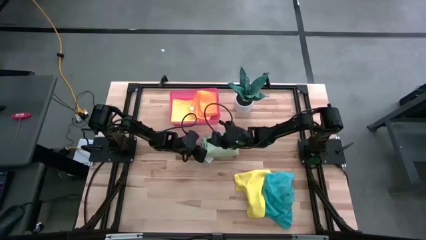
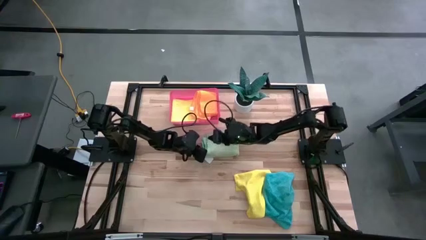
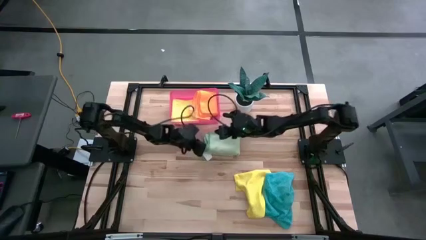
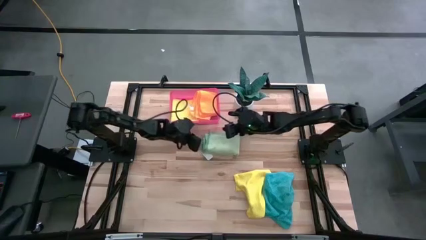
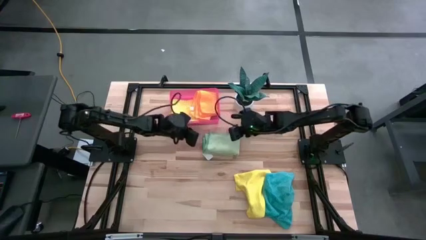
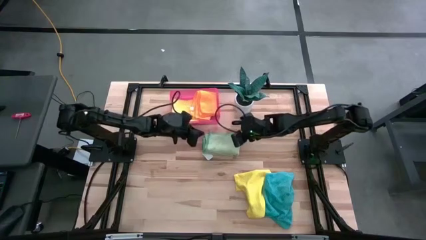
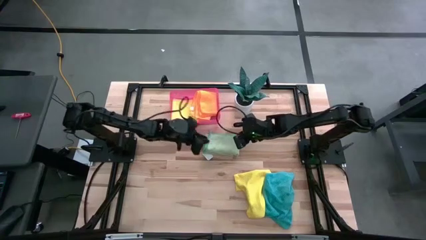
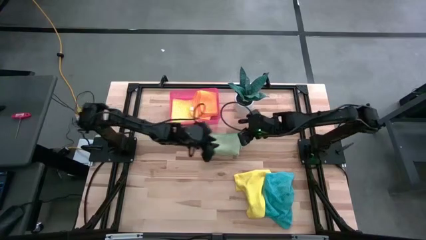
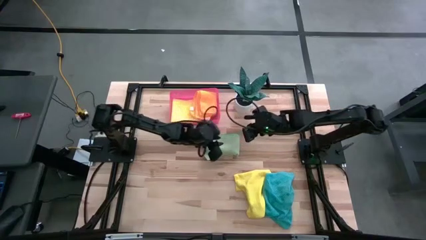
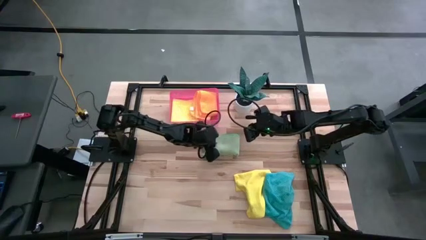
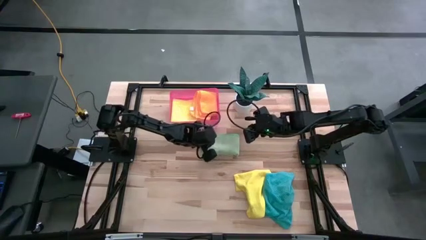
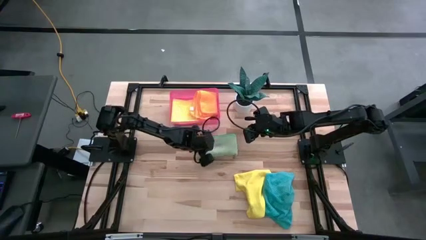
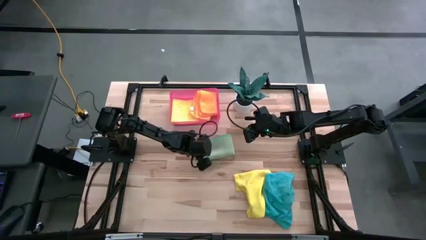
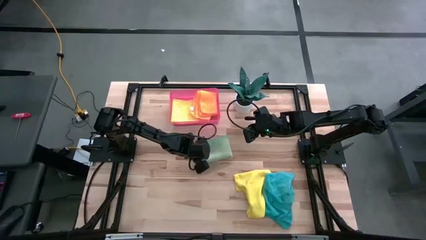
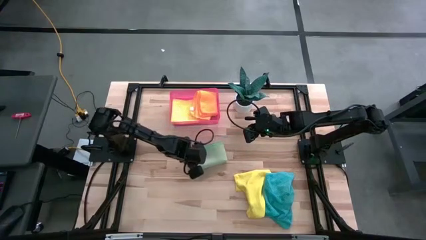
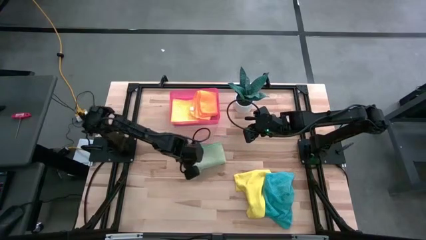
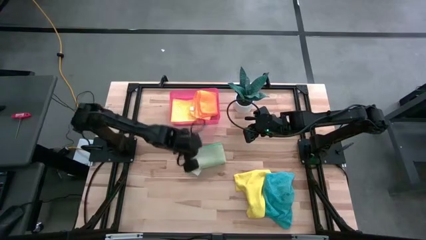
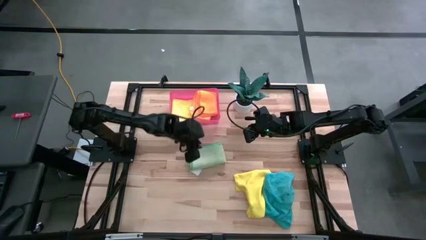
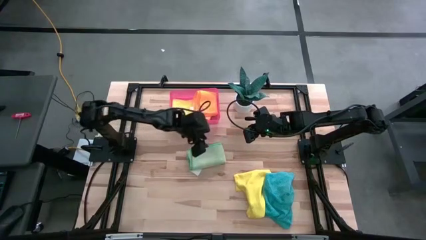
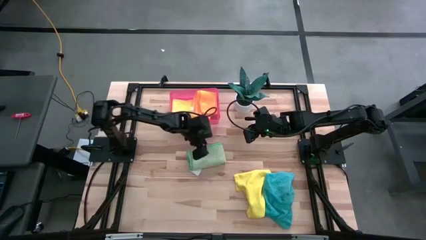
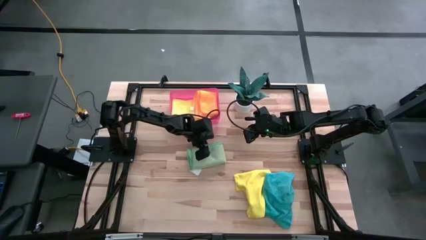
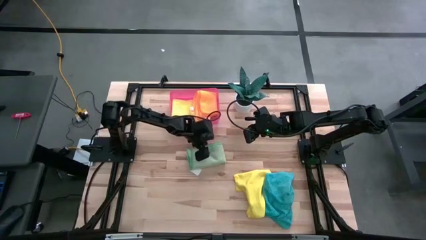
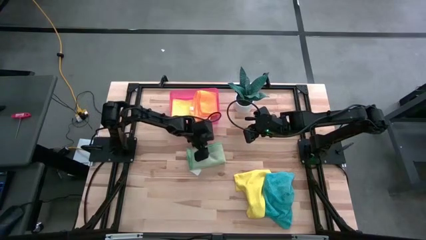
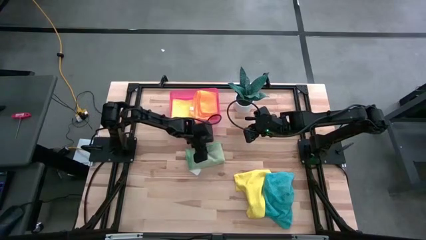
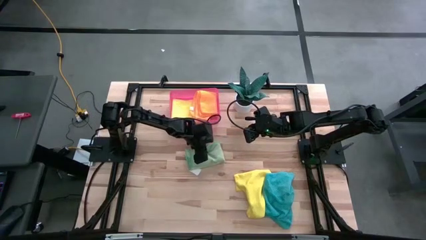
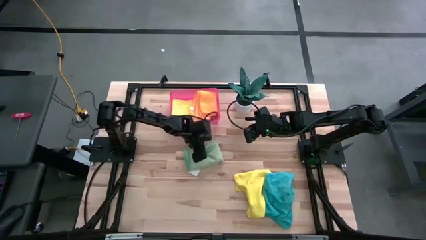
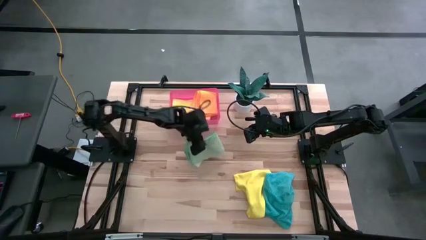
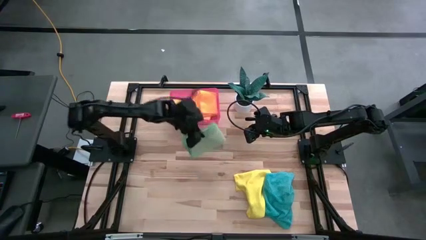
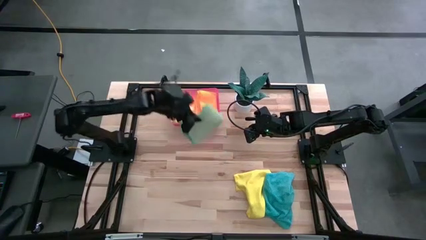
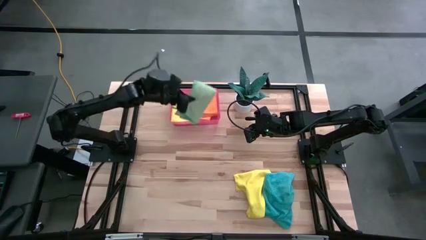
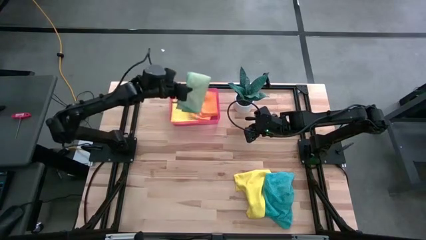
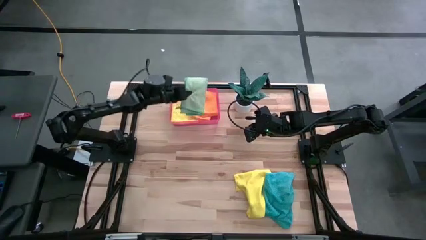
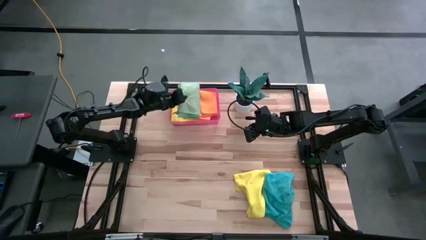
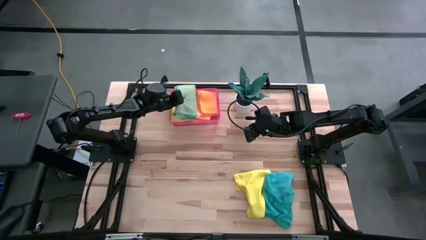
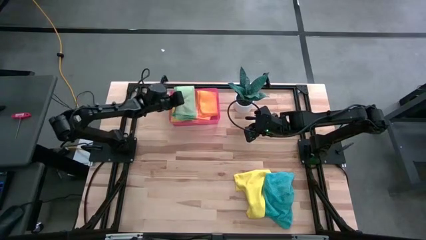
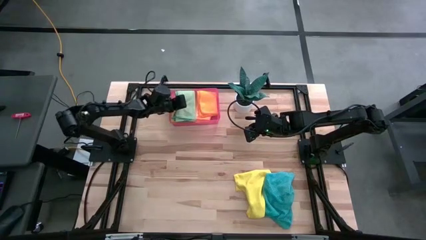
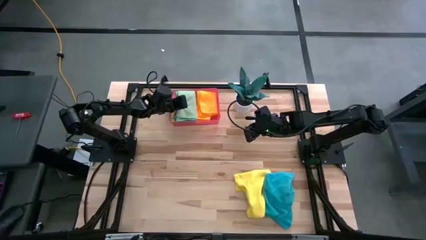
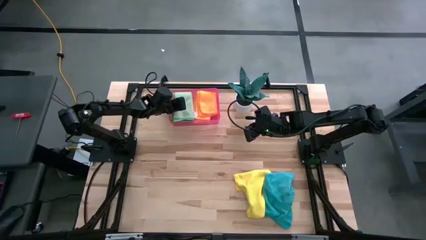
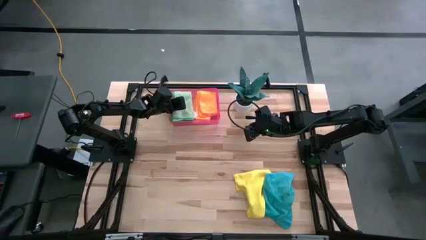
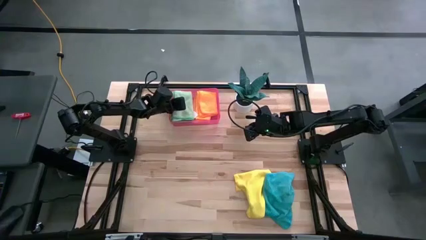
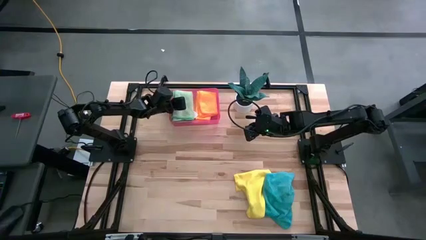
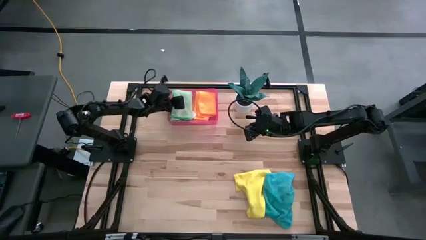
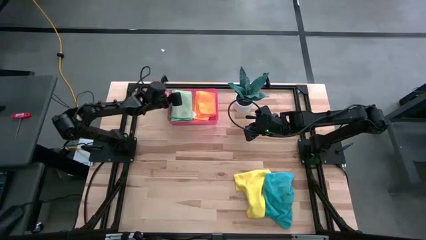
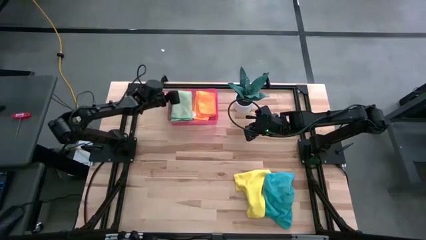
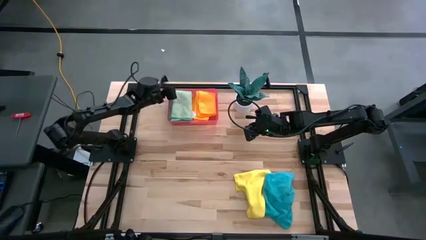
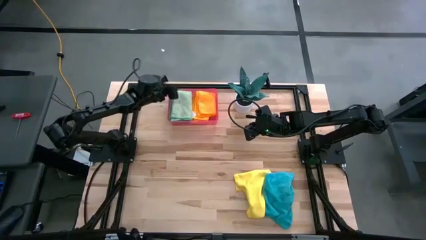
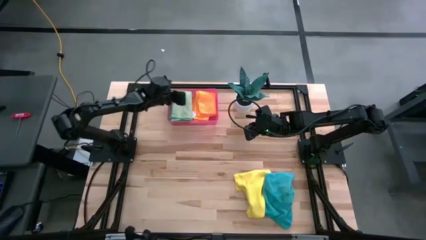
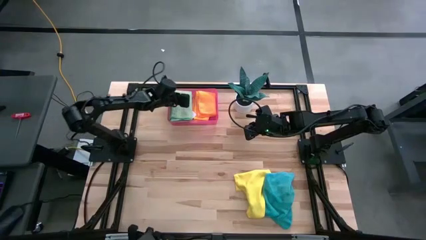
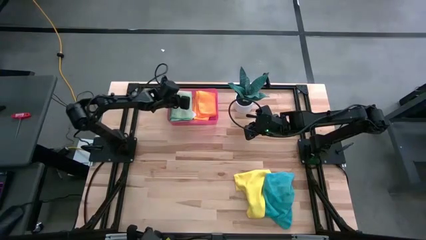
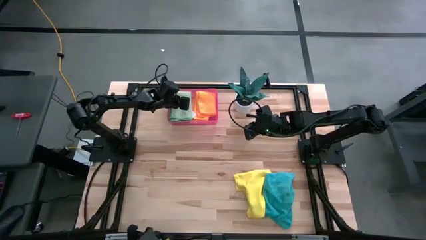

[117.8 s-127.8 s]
Task: Fold microfiber towels
Put the green microfiber towel into the bin

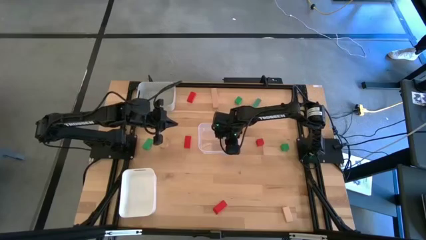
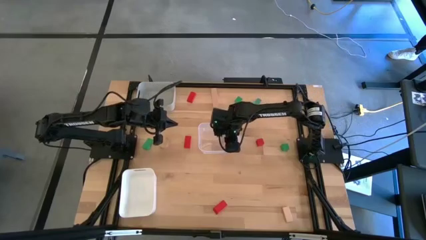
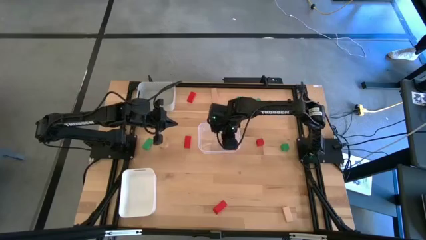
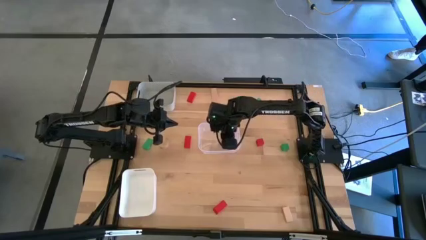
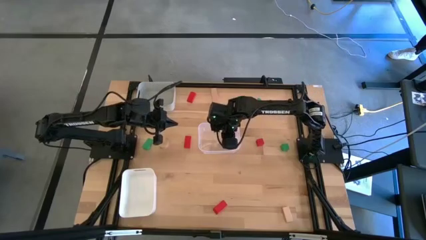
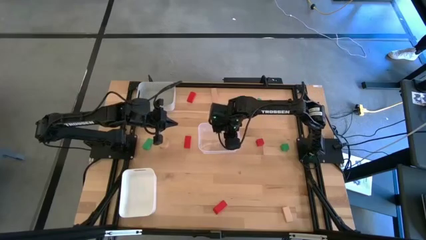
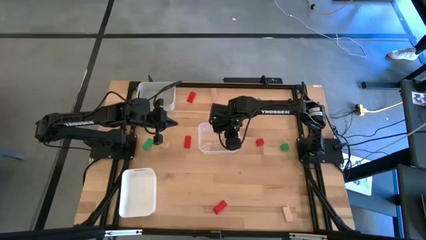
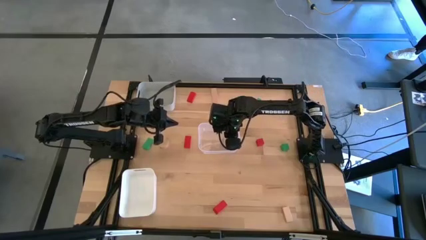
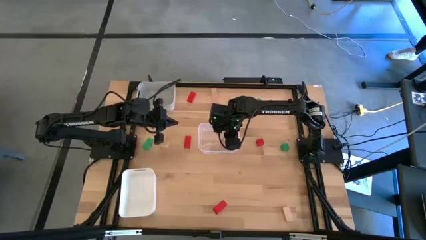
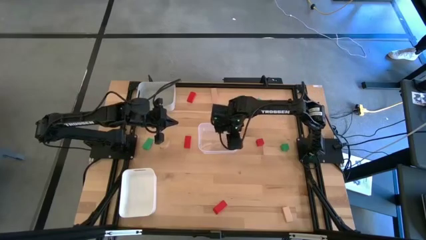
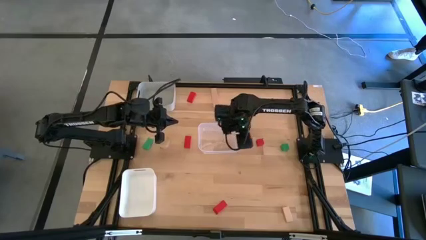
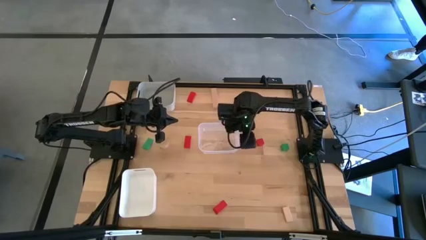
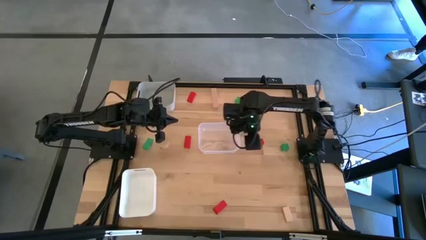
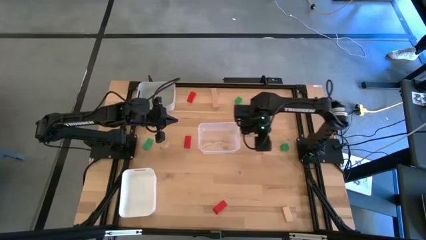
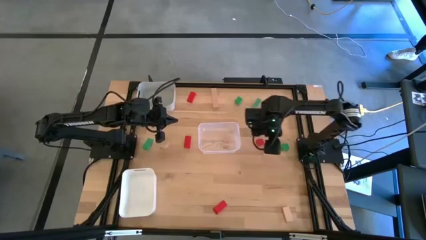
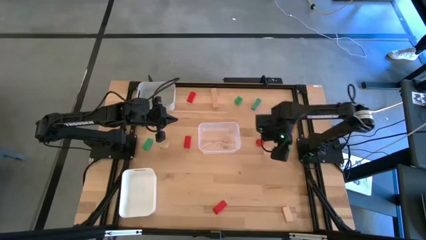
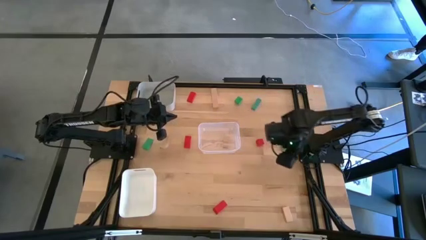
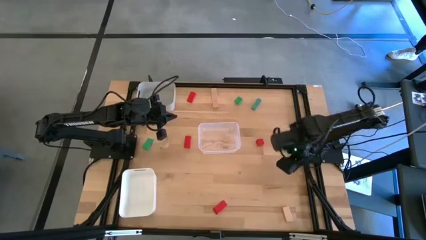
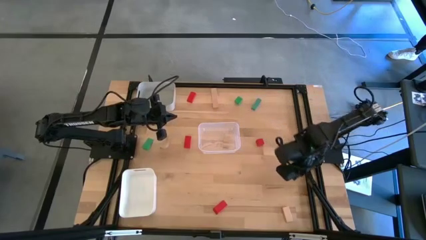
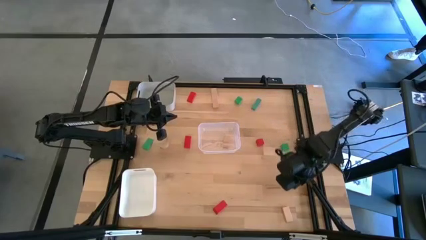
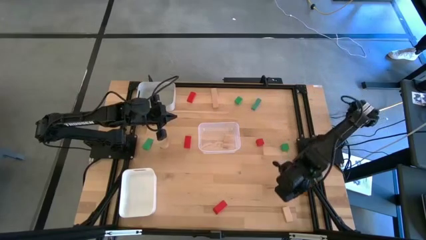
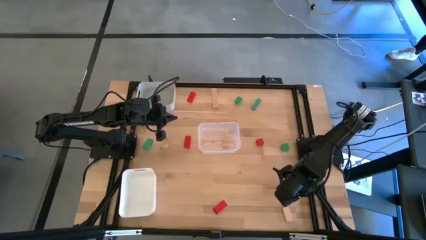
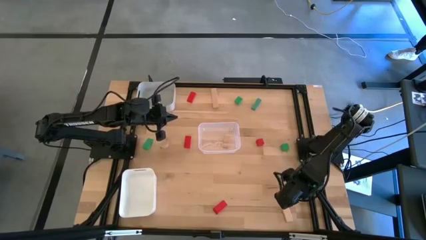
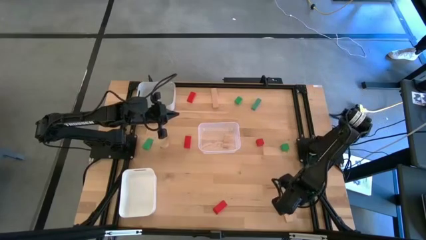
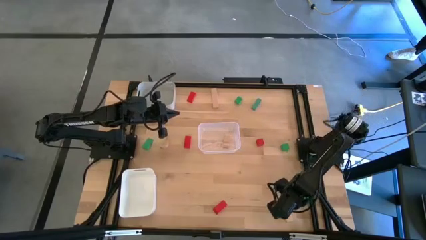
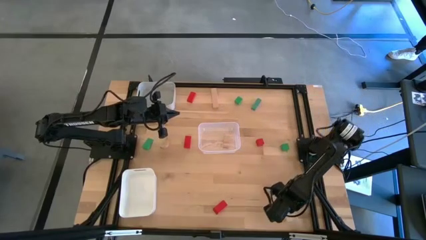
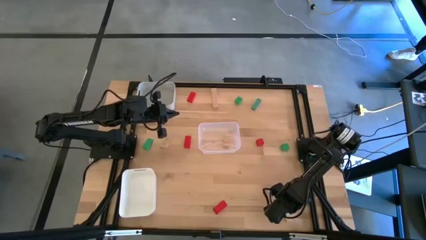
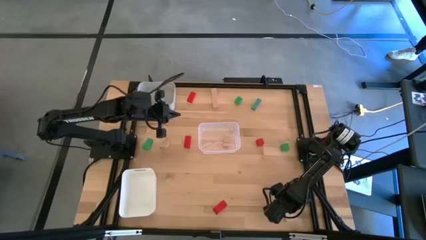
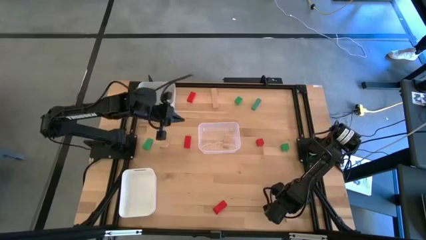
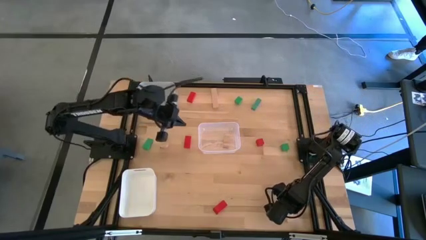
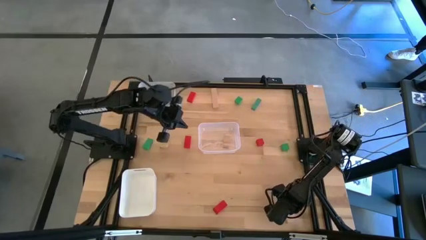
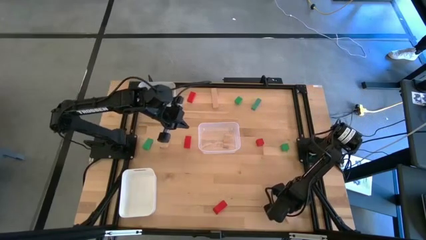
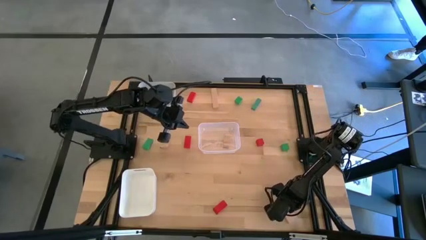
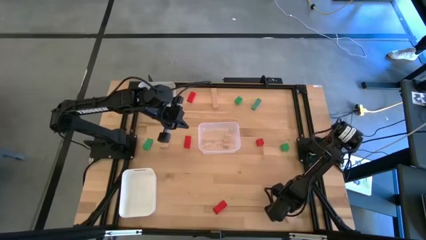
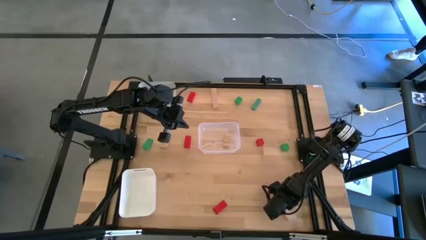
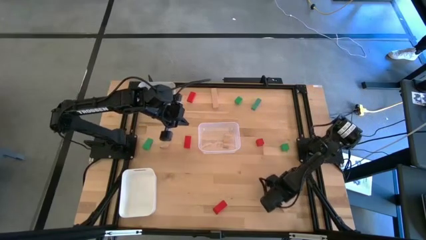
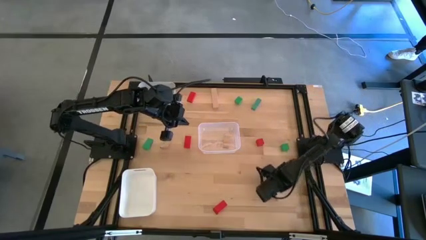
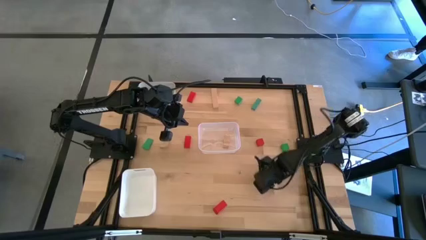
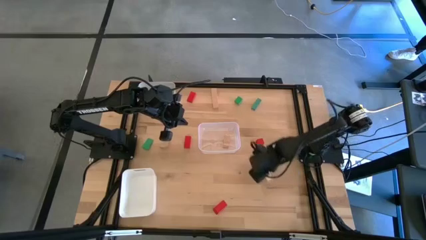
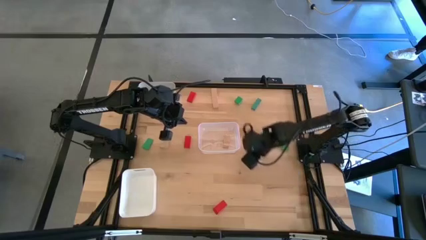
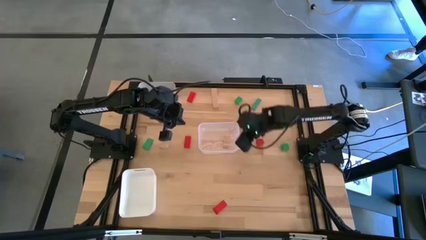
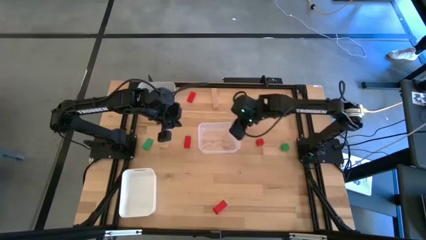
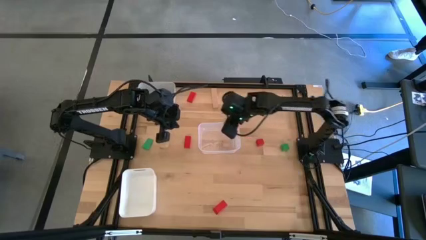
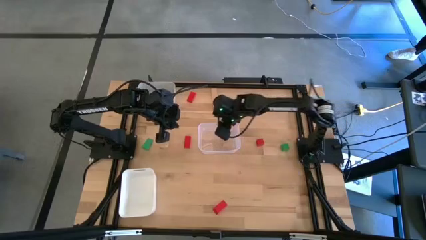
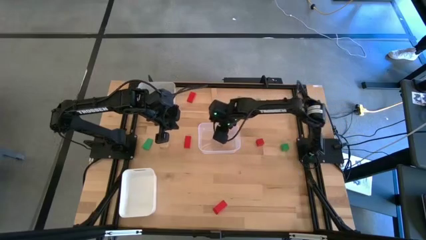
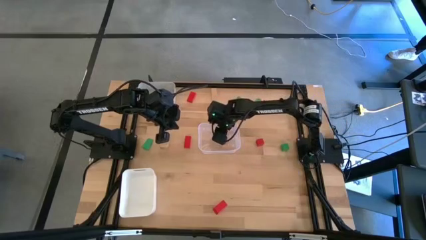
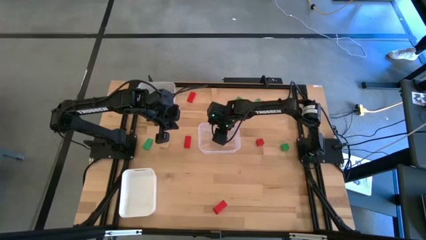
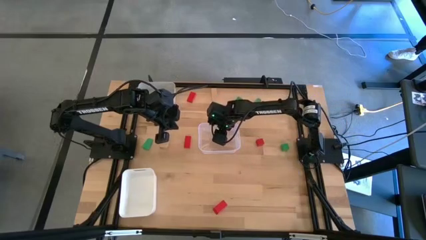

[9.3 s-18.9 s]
Task: Sort & place blocks by color
Put the brown block into the transparent bin
